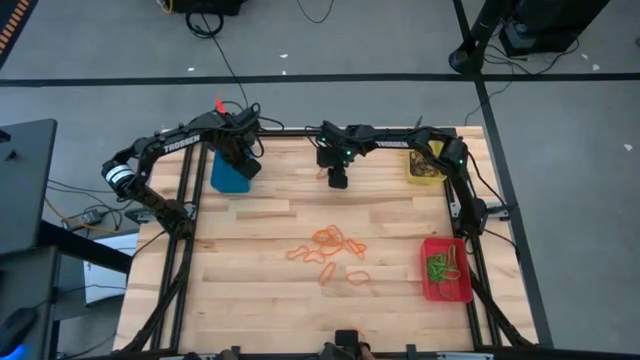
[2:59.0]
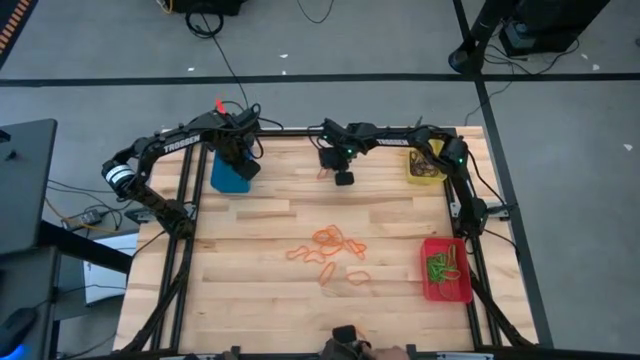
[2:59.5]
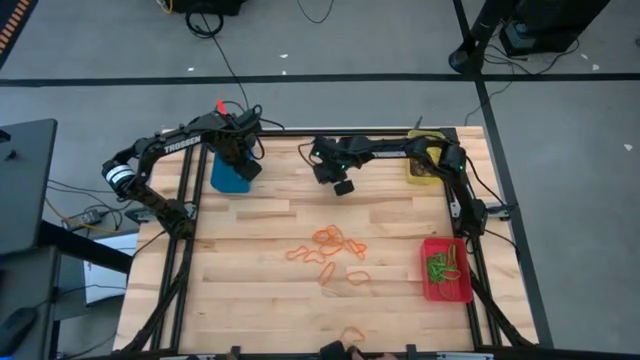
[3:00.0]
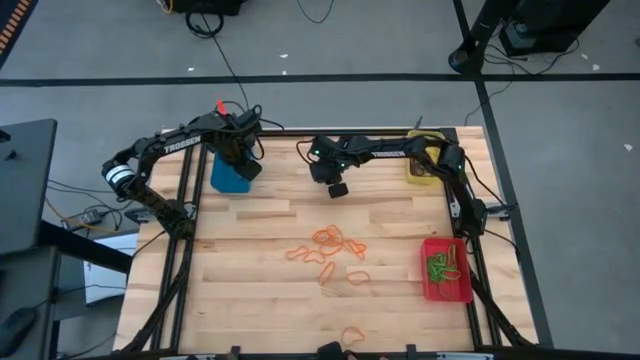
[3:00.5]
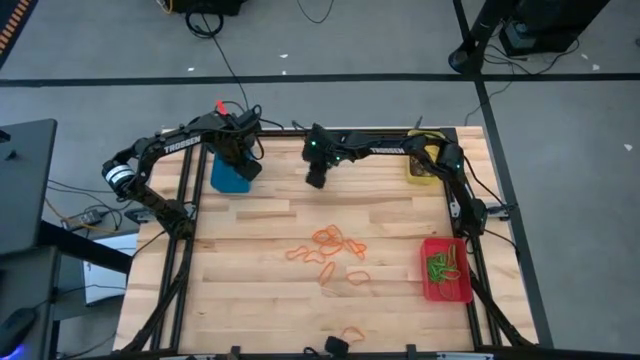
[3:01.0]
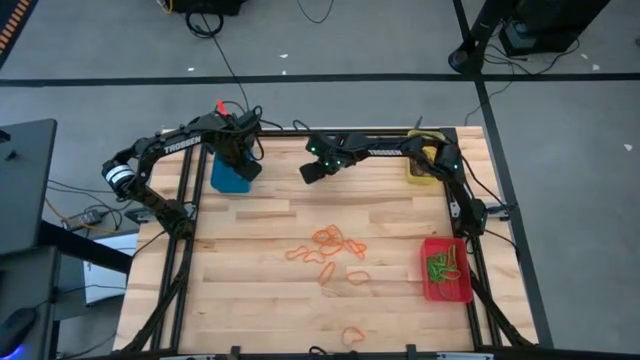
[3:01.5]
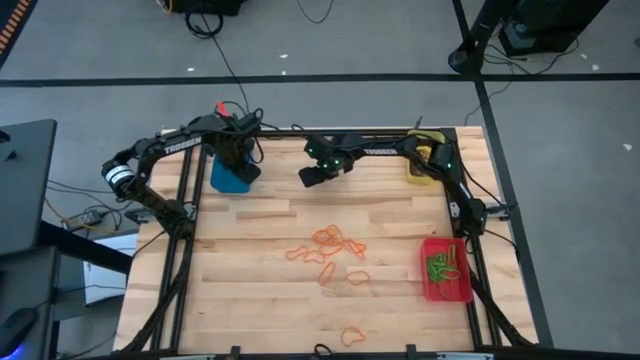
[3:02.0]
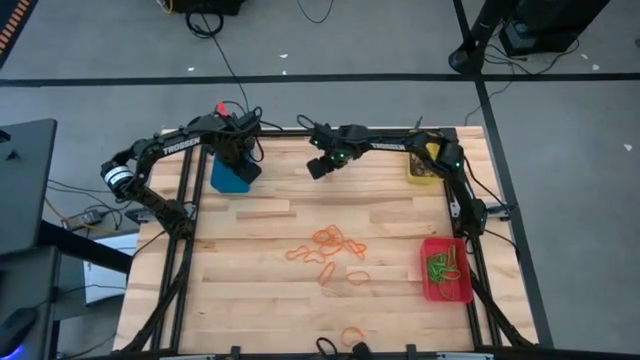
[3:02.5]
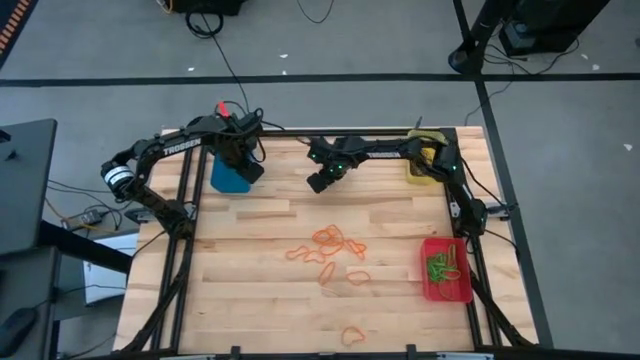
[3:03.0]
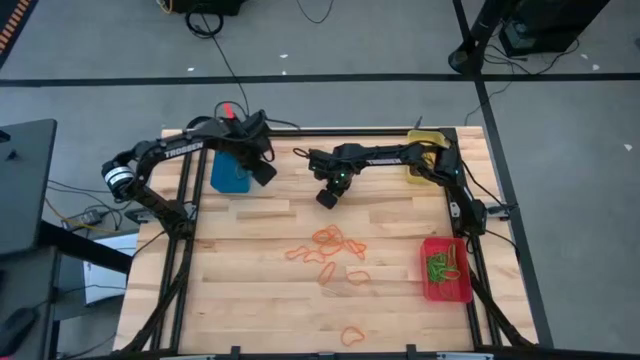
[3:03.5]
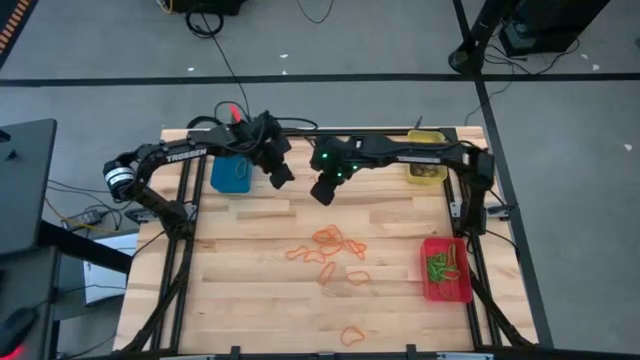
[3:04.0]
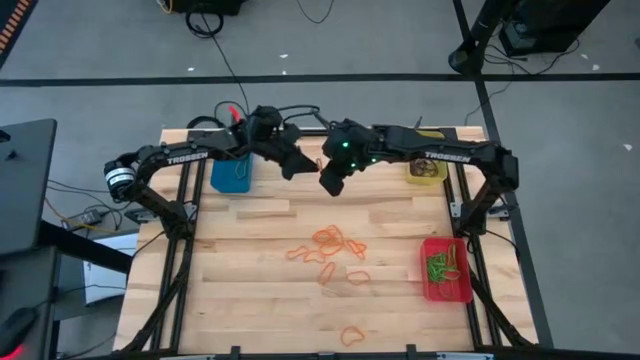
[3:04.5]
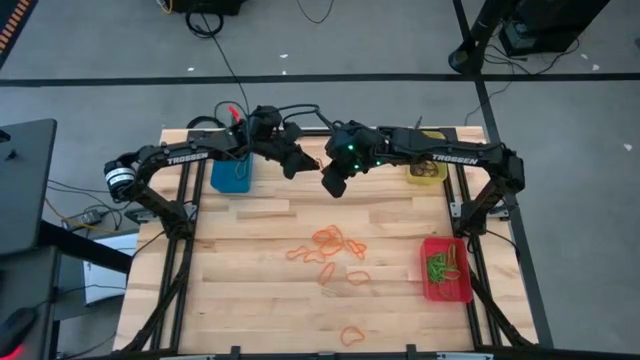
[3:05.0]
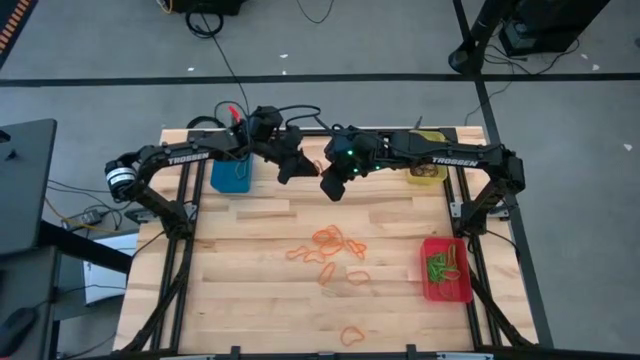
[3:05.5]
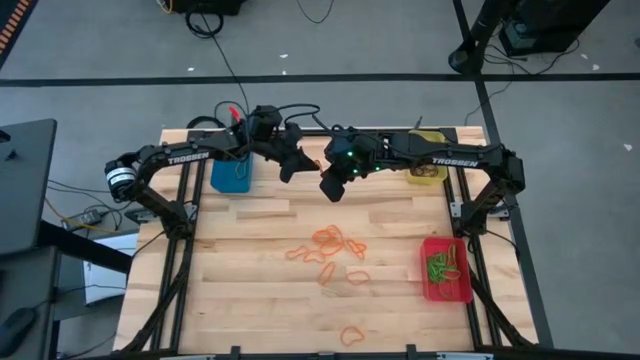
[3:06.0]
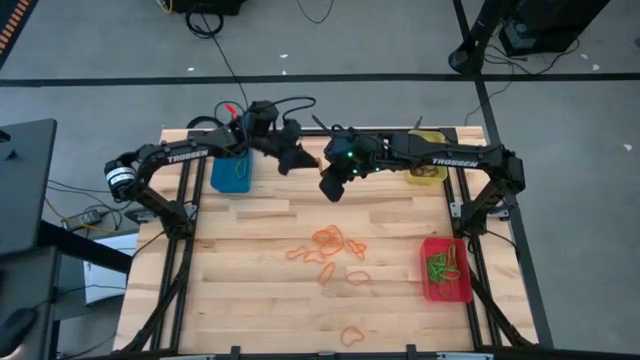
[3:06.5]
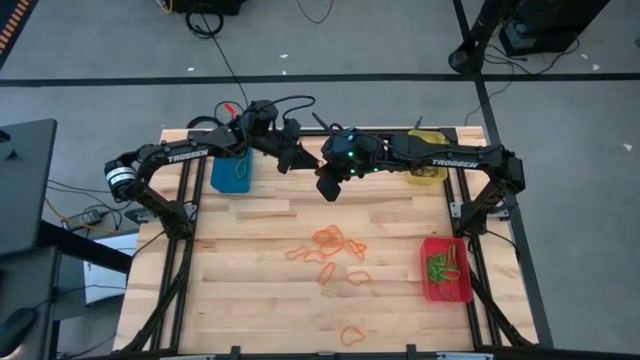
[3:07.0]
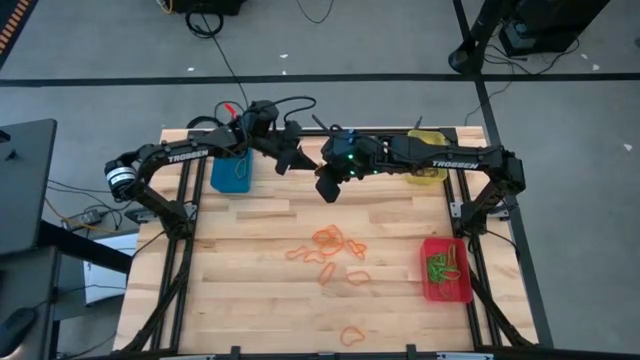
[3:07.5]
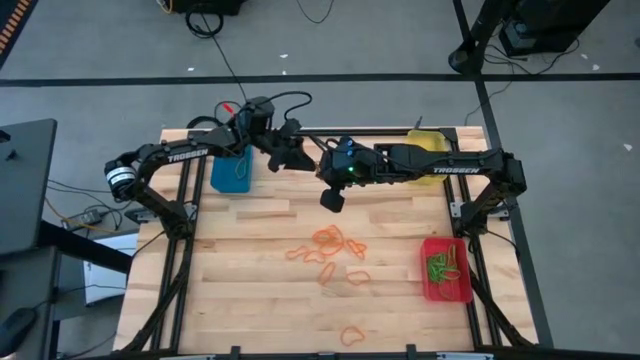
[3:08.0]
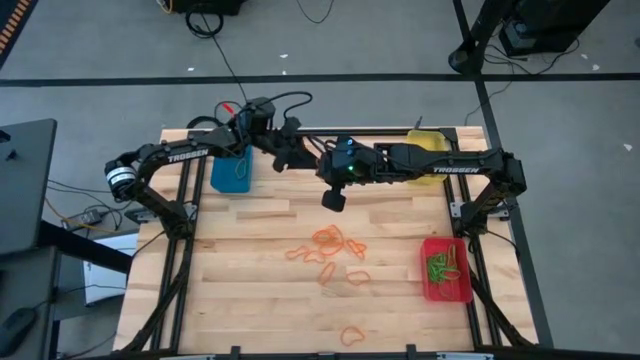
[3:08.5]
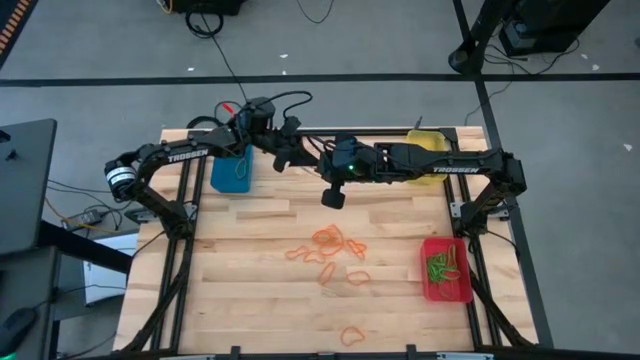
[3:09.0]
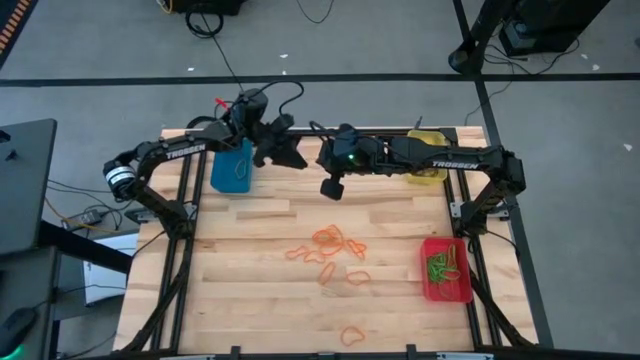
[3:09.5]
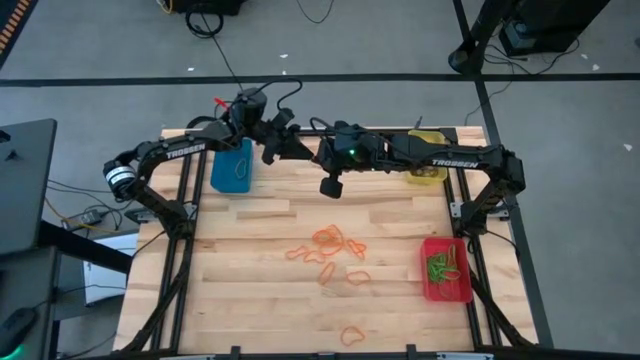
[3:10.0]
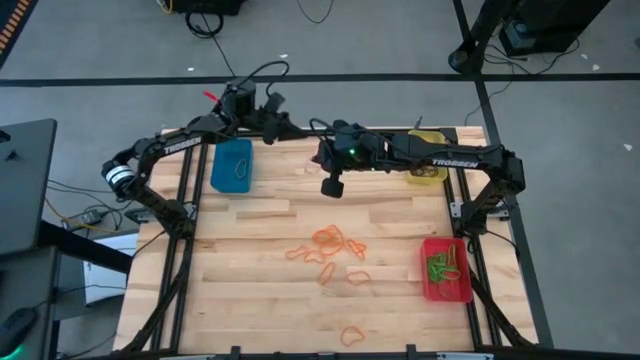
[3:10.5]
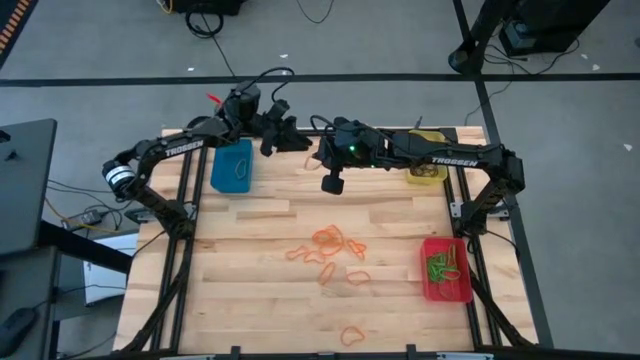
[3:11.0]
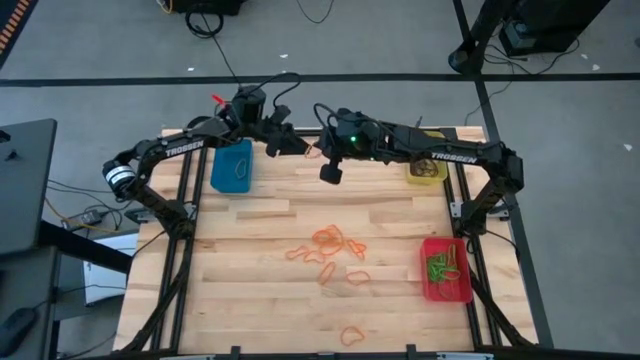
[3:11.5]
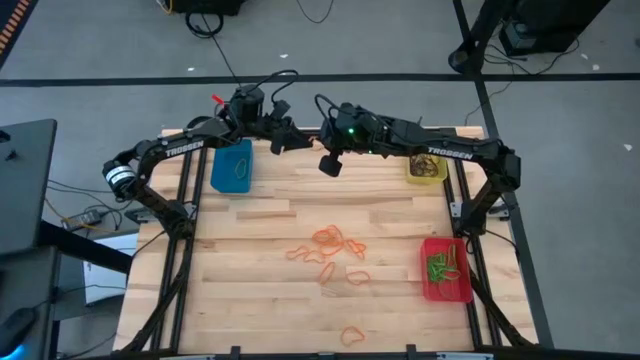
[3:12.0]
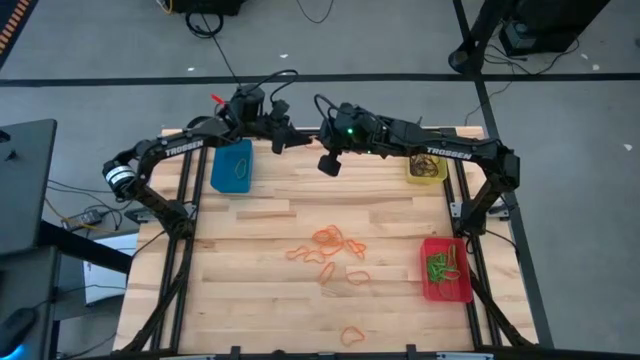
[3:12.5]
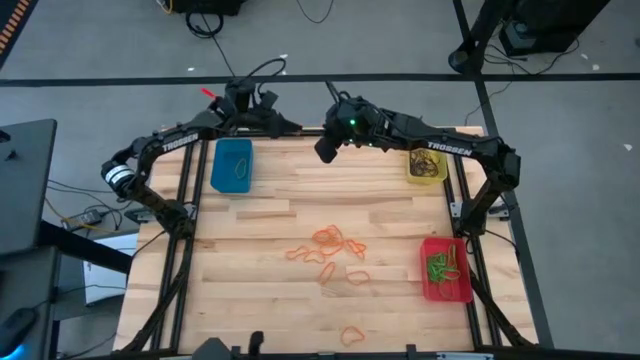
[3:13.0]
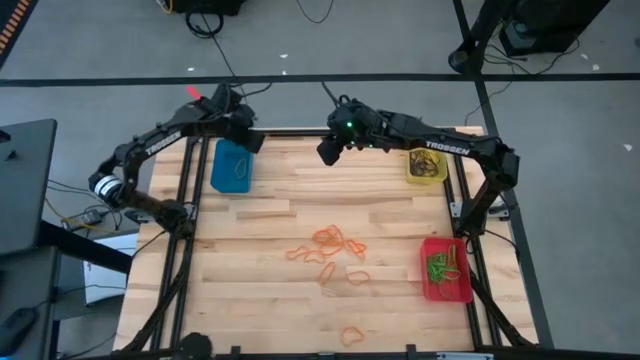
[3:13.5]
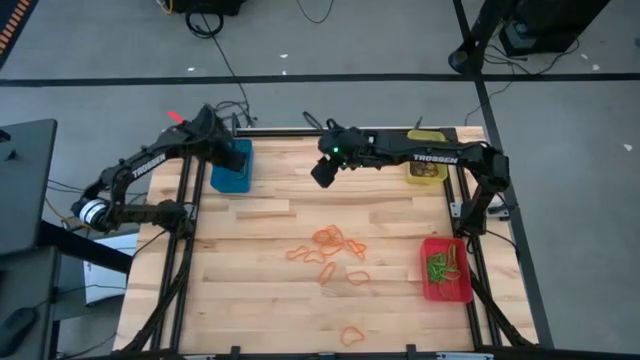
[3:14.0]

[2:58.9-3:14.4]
Task: Sort rubber bands into baskets
Put the orange rubber band into the blue bin

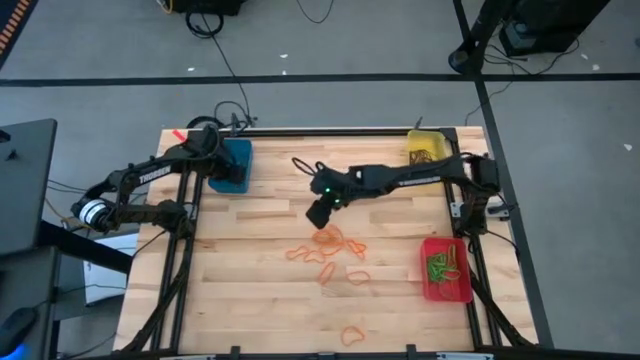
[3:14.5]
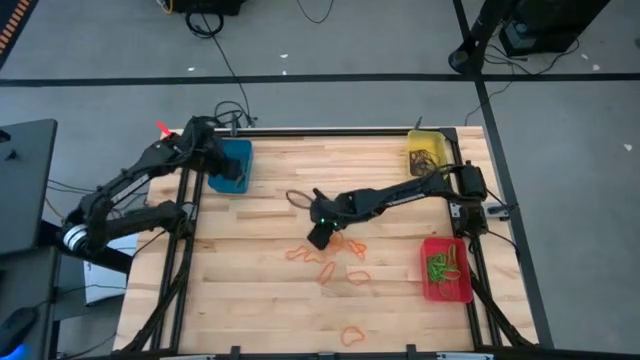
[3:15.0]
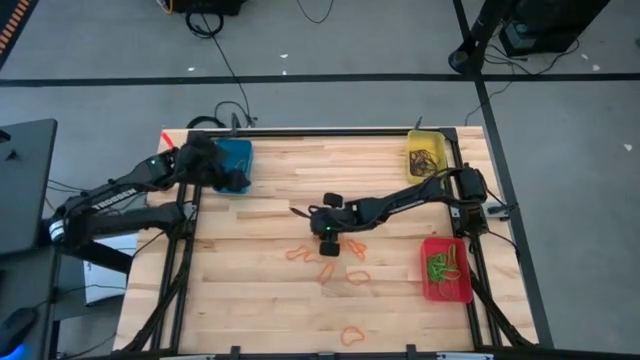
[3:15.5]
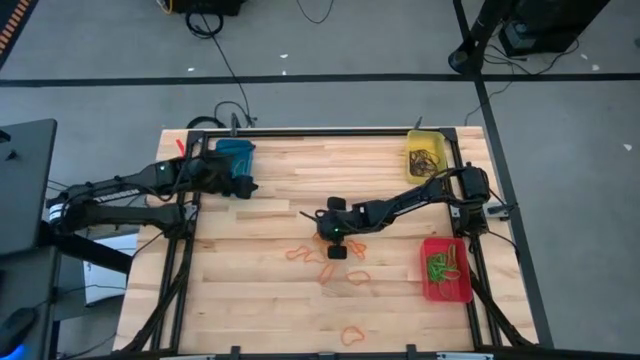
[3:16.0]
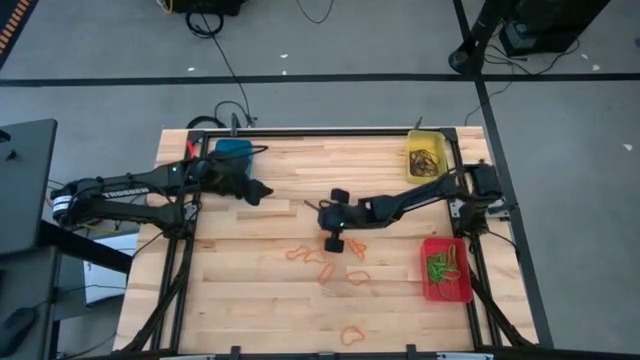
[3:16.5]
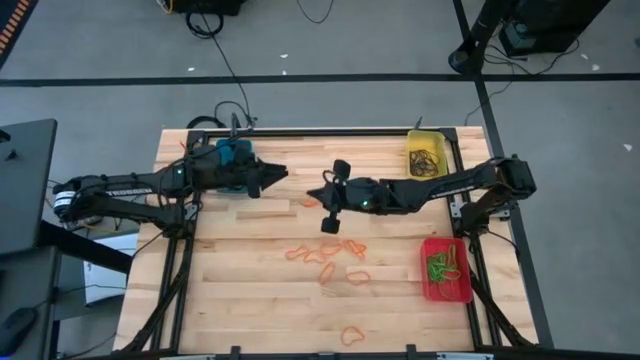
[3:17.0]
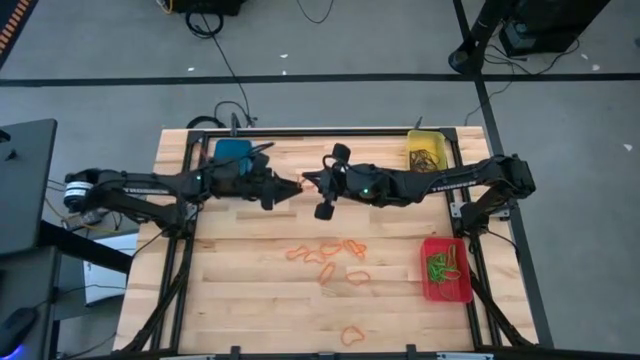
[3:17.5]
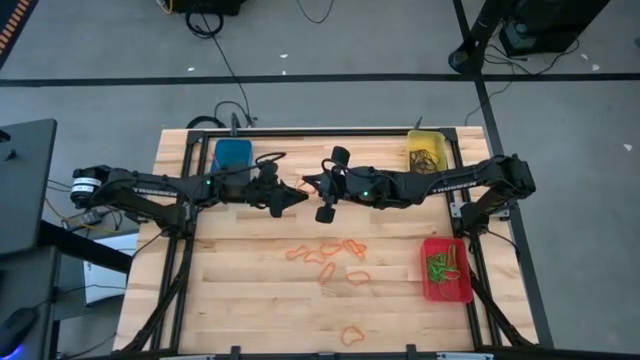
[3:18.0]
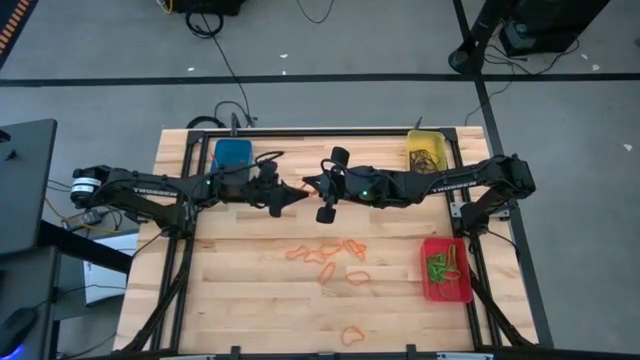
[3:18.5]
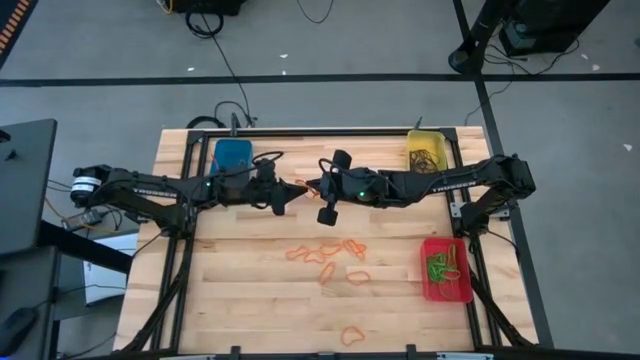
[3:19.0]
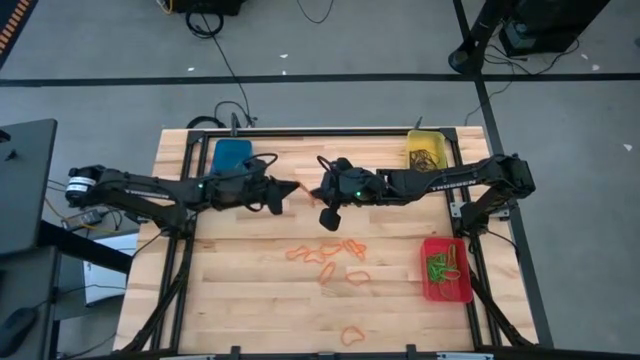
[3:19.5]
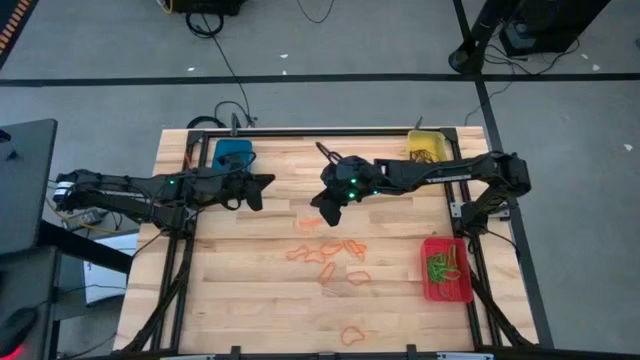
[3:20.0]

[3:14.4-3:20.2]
Put the orange rubber band into the blue bin

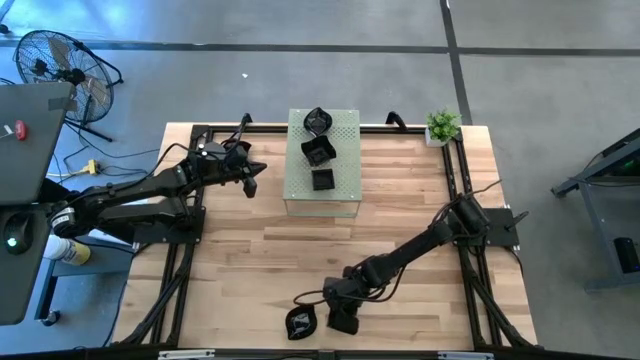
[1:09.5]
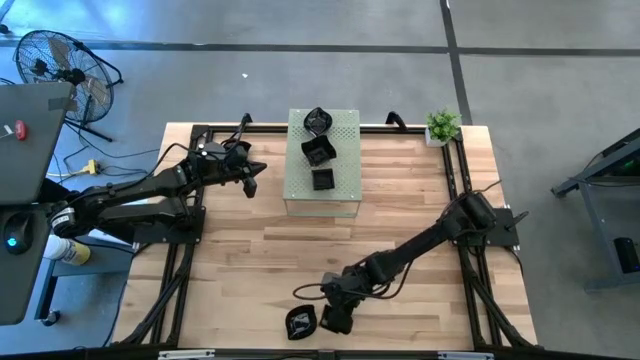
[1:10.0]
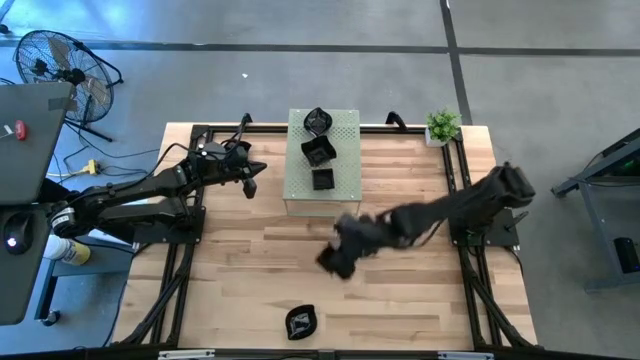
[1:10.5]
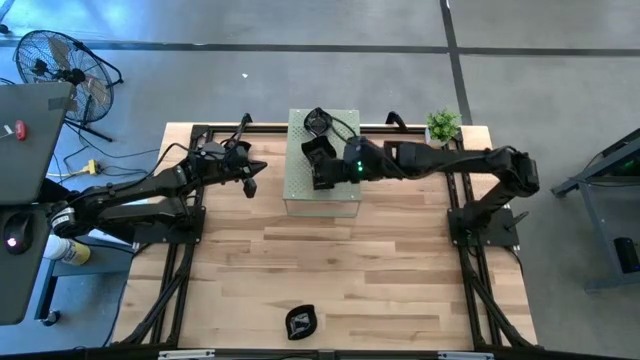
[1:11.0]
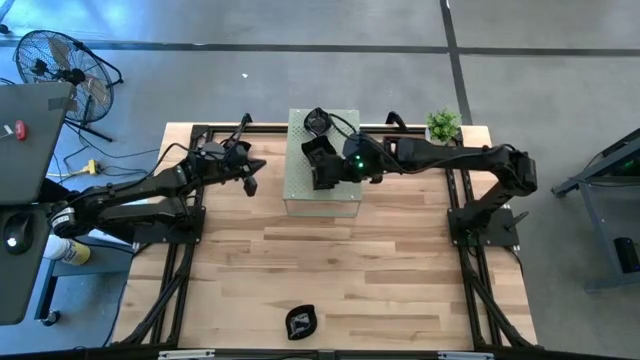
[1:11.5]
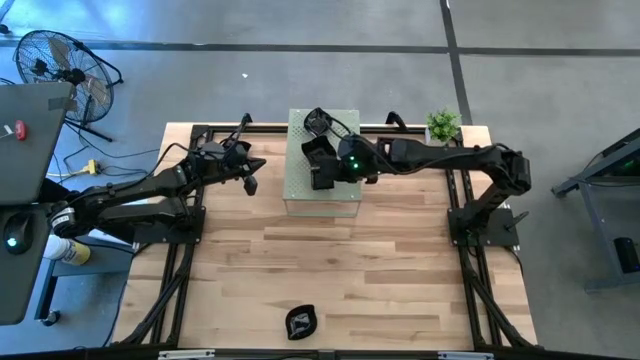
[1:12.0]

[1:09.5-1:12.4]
Task: Pick & Place Mini shaped plates
Stack the black square plate on top of the black square plate on the shelf
